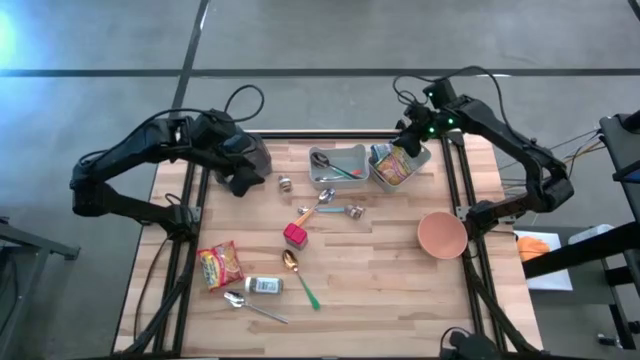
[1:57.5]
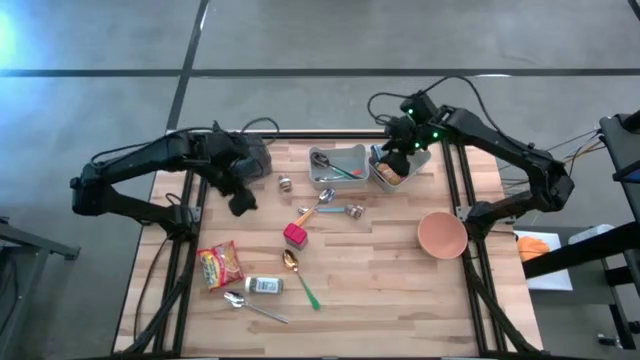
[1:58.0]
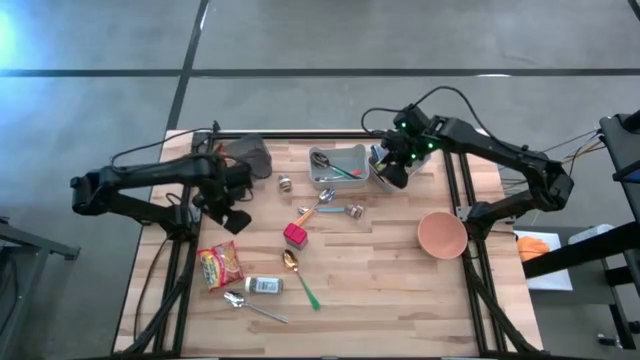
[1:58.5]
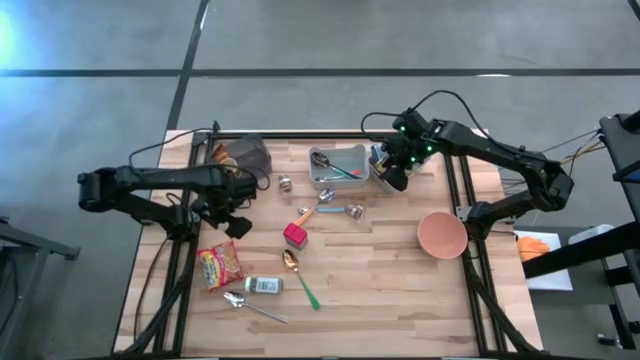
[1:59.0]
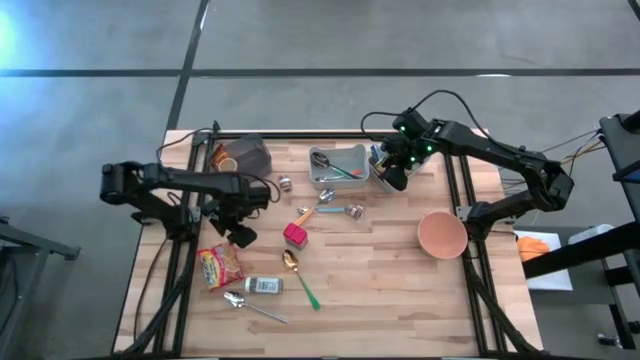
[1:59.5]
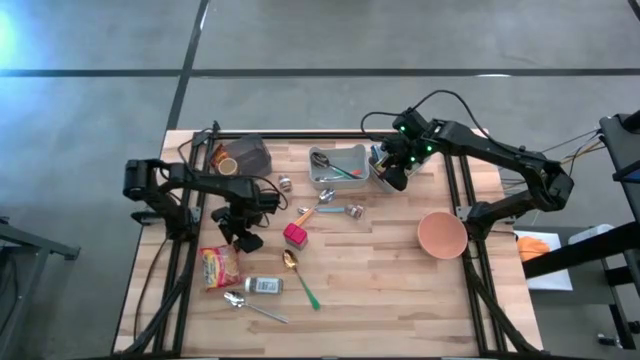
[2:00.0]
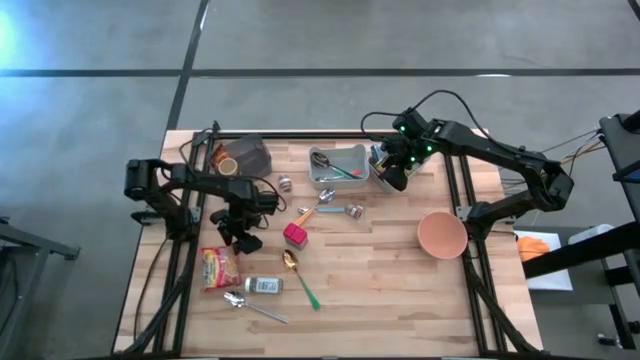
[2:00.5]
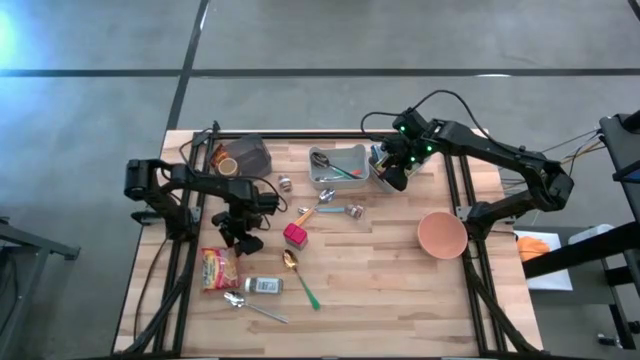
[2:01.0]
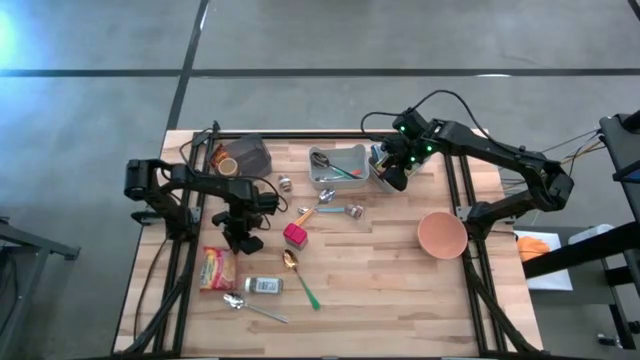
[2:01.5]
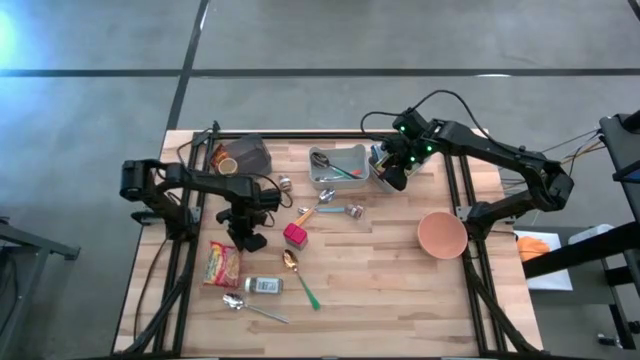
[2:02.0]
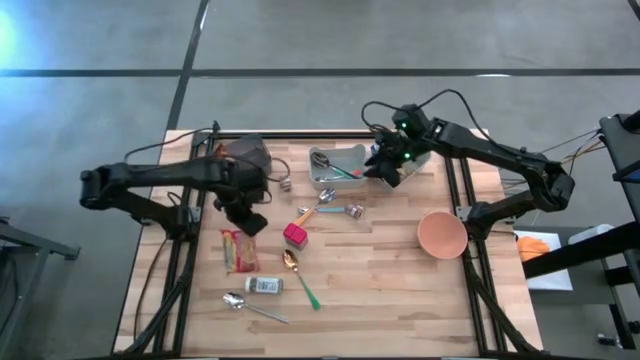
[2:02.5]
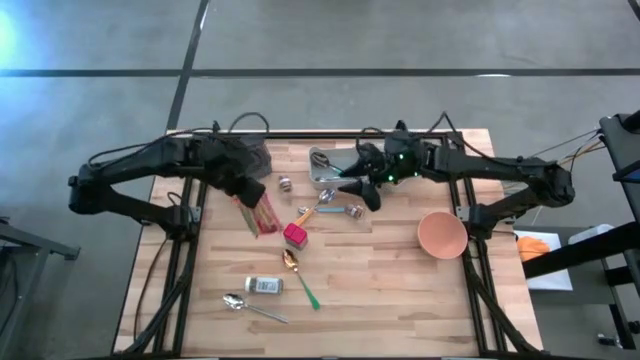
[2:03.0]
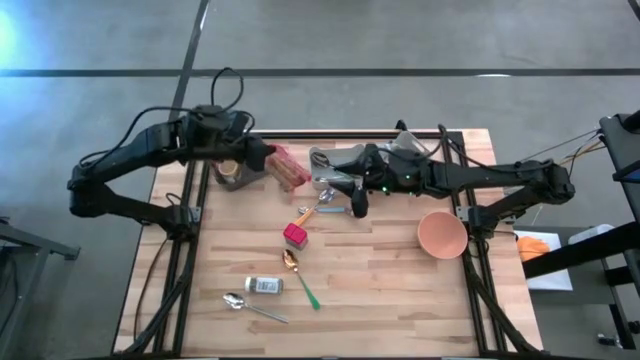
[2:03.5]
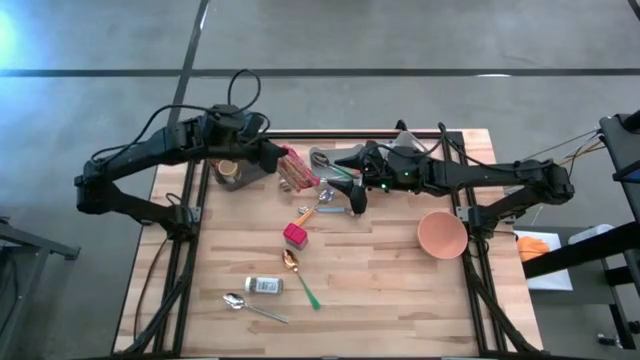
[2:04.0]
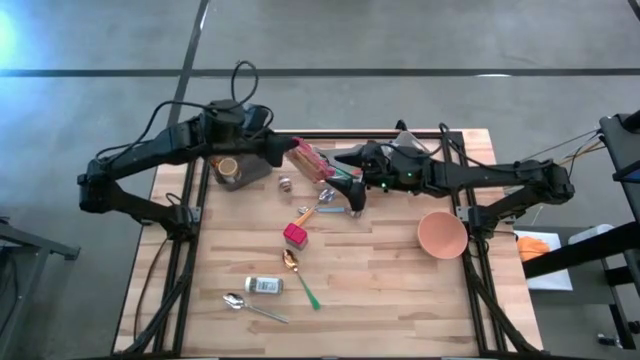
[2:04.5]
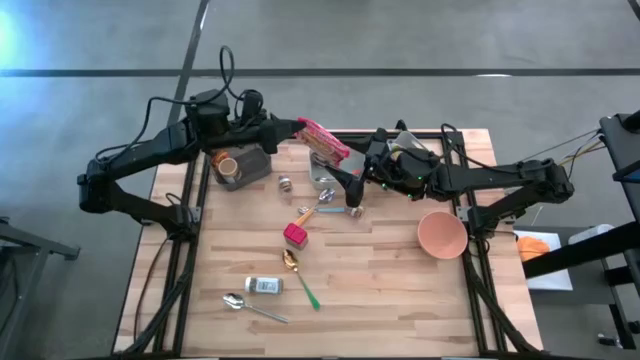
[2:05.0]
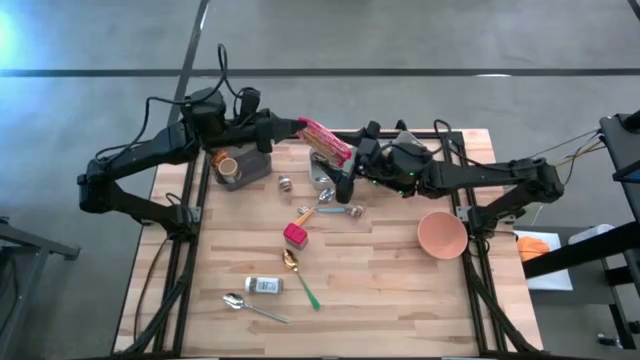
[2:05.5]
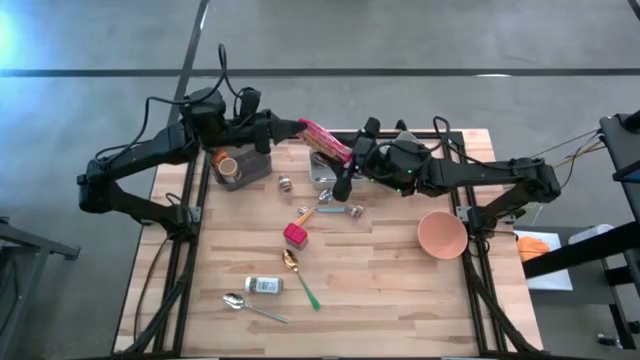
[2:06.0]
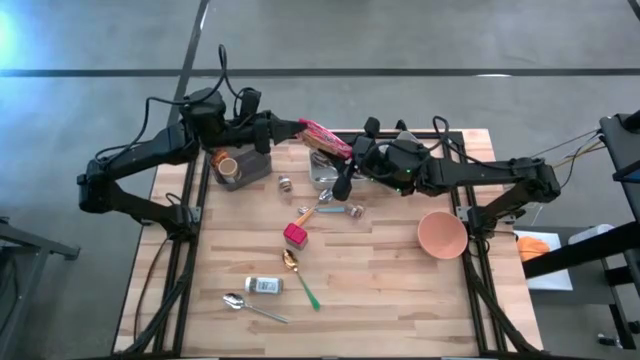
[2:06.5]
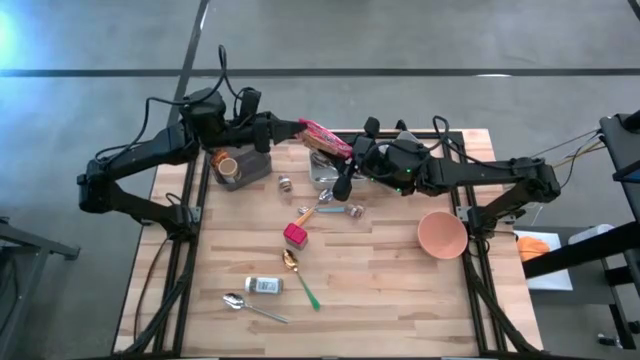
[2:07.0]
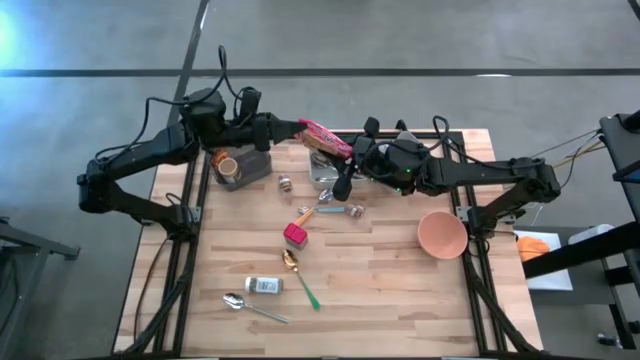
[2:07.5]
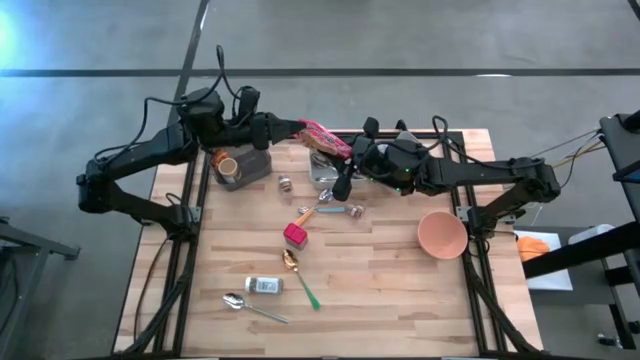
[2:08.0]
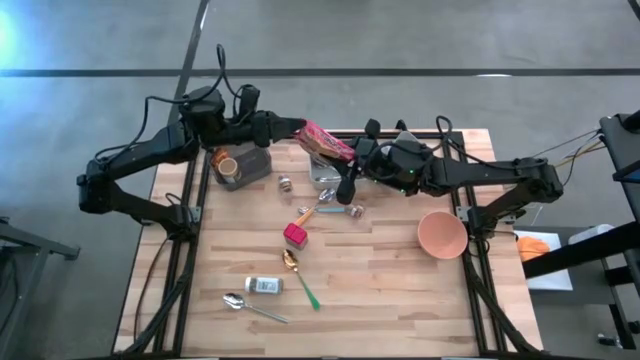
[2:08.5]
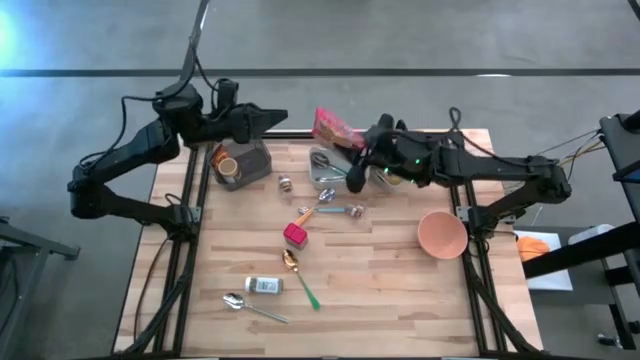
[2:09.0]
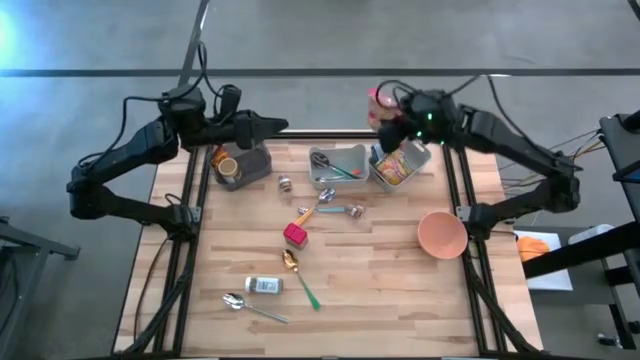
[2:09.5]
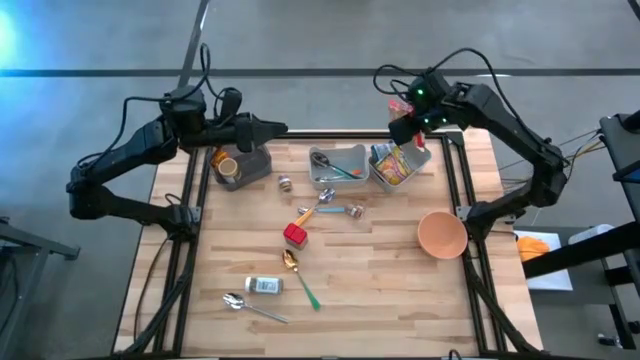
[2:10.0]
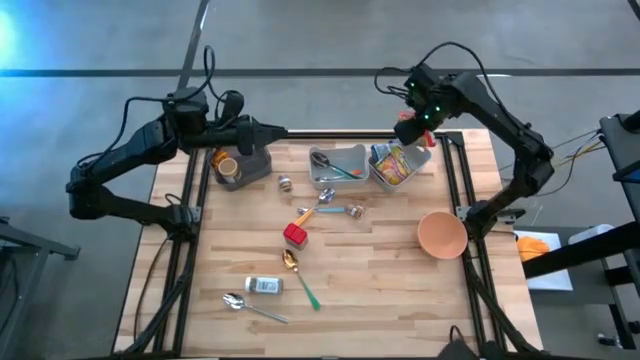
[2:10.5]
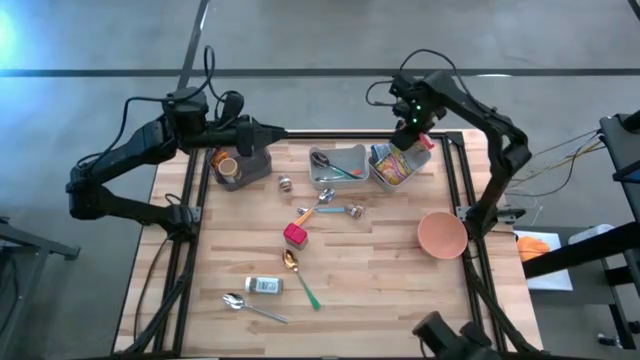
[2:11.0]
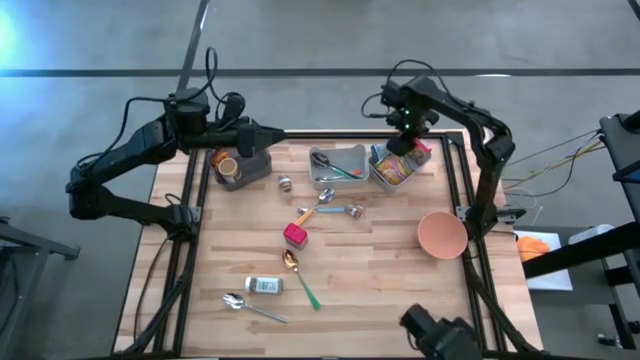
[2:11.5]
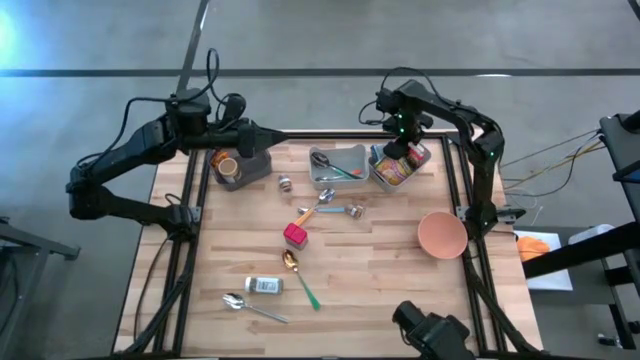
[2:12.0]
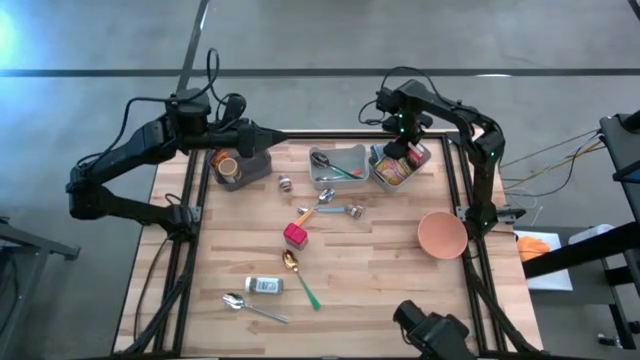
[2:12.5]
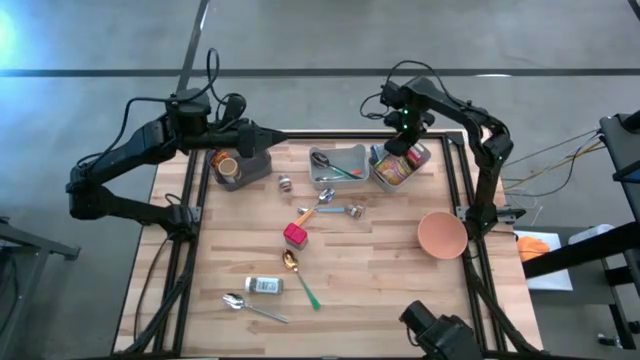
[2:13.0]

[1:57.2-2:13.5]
Put the red noodle pack into the right gray bin

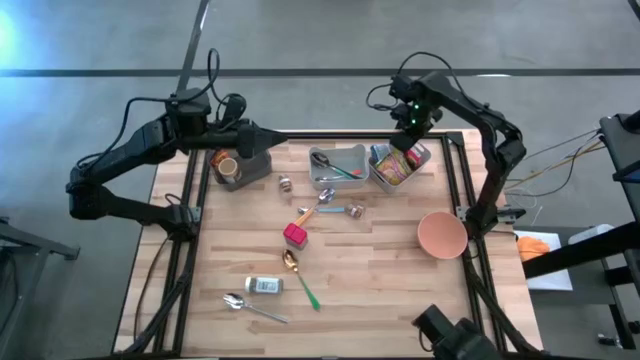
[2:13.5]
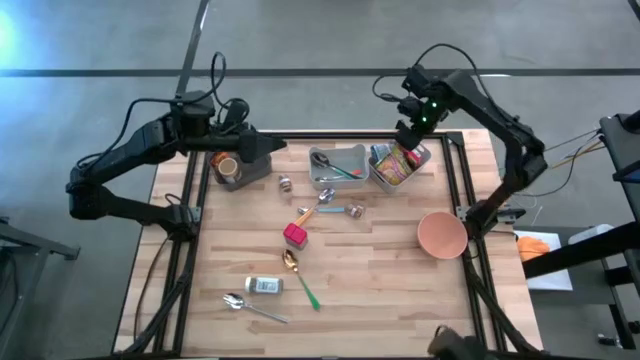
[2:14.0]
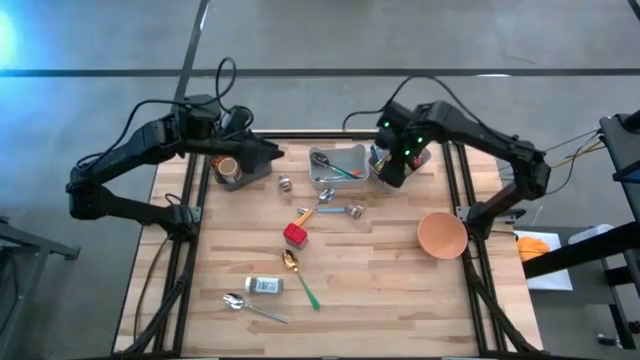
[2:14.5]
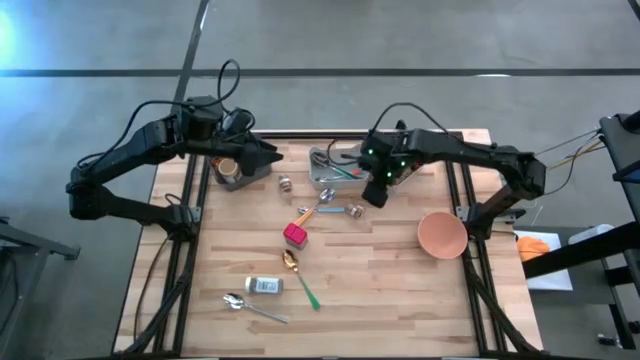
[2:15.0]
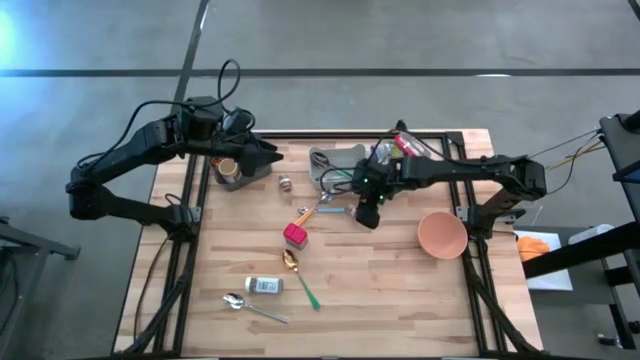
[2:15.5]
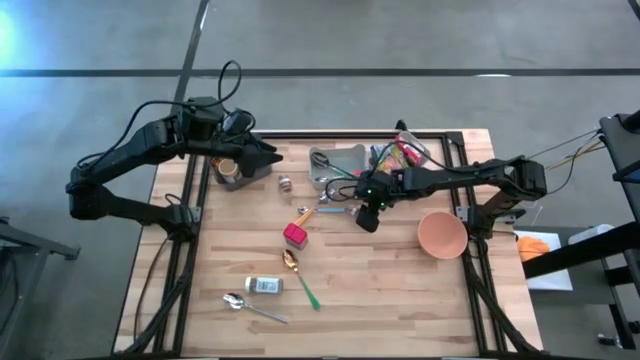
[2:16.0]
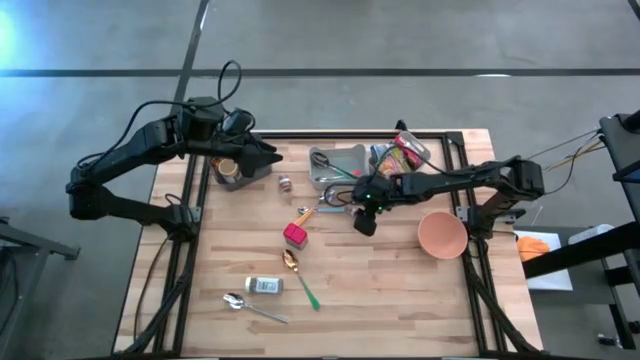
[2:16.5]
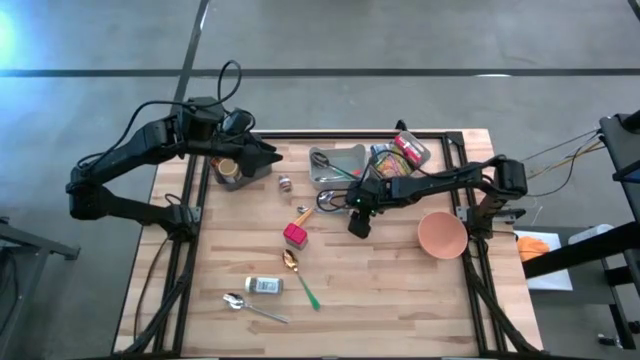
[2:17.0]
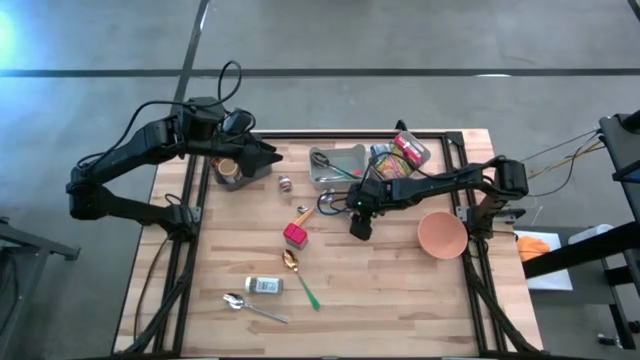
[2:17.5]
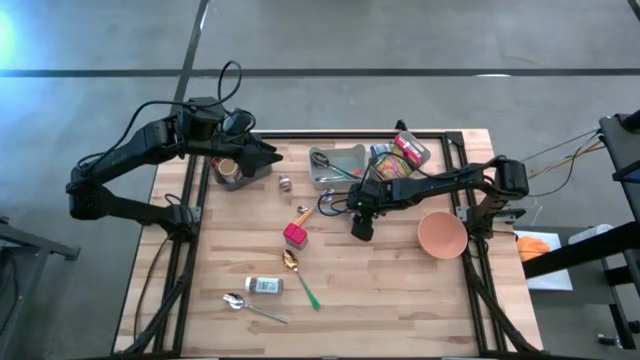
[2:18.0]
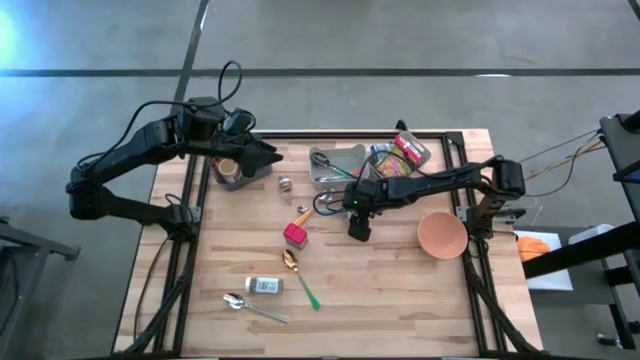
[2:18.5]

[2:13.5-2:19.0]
Put the brown seasoning bottle into the black bin
